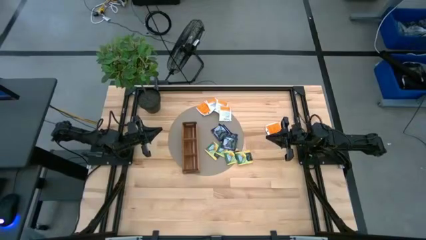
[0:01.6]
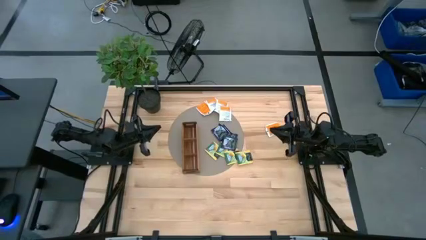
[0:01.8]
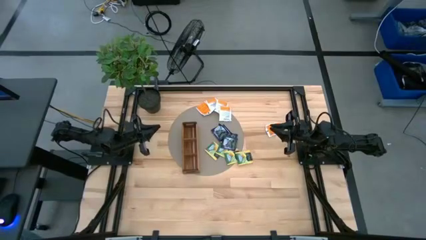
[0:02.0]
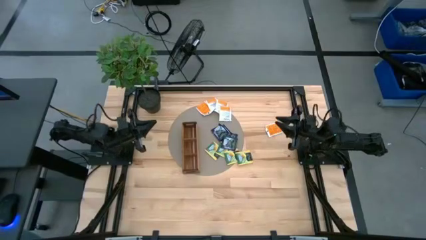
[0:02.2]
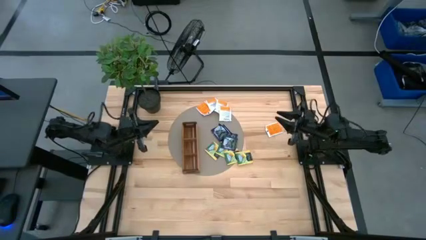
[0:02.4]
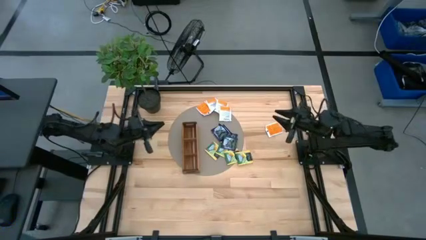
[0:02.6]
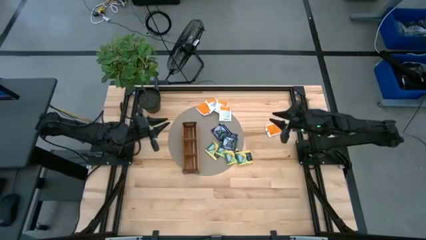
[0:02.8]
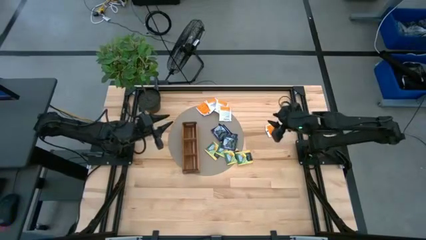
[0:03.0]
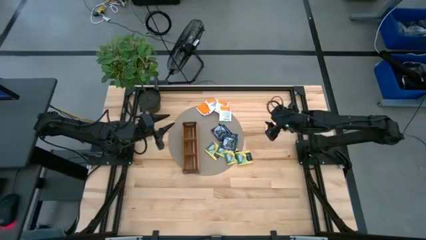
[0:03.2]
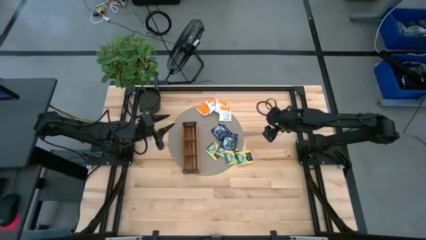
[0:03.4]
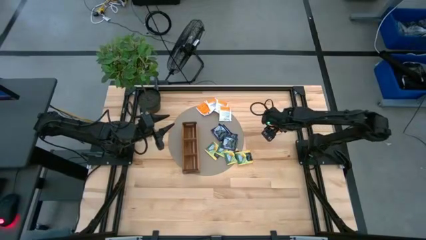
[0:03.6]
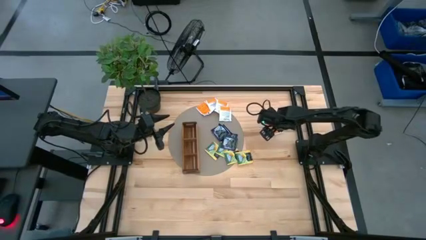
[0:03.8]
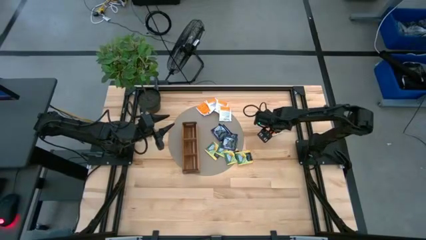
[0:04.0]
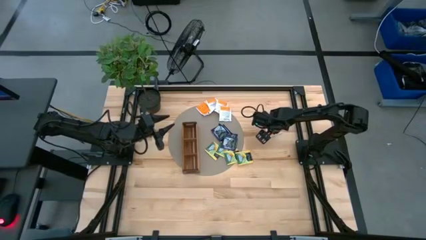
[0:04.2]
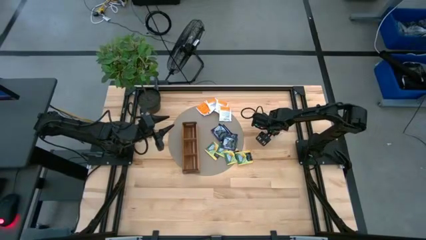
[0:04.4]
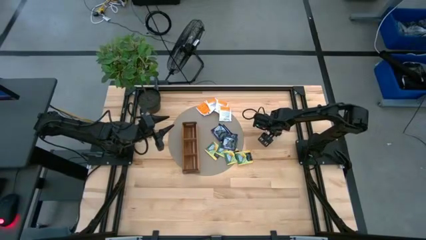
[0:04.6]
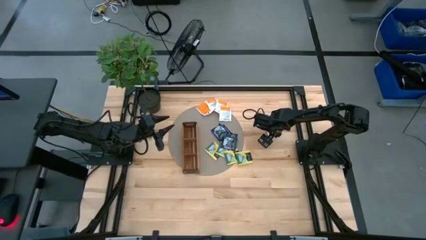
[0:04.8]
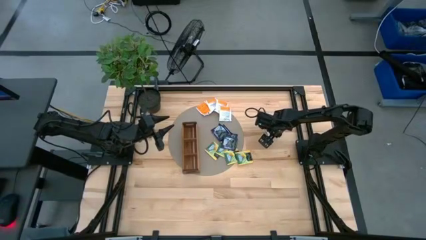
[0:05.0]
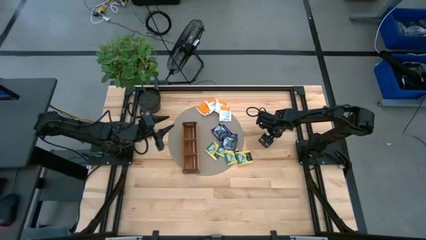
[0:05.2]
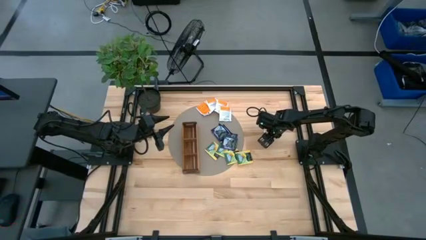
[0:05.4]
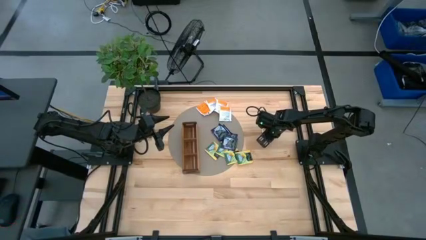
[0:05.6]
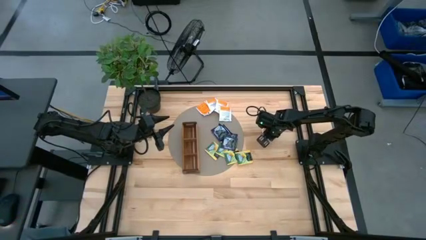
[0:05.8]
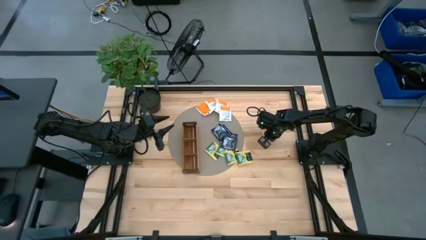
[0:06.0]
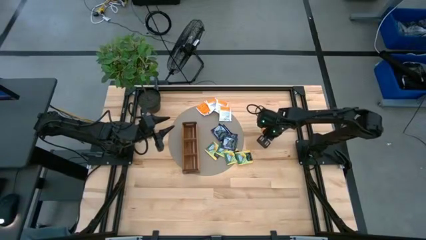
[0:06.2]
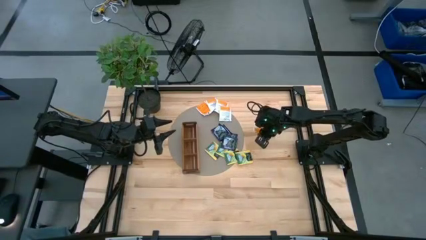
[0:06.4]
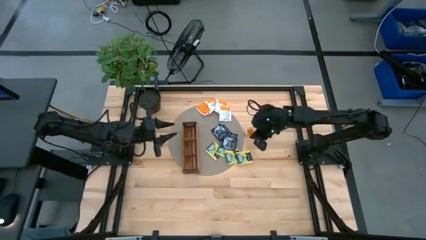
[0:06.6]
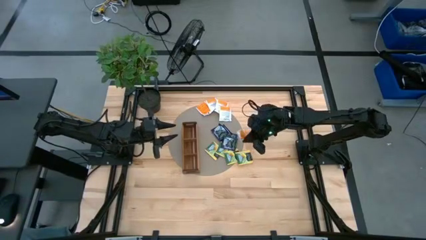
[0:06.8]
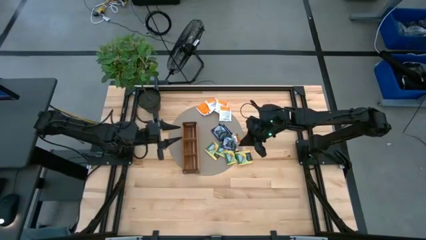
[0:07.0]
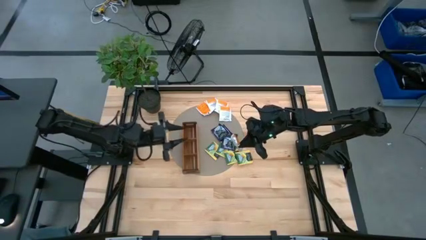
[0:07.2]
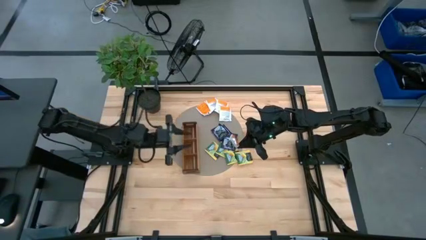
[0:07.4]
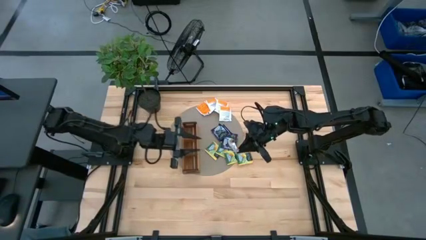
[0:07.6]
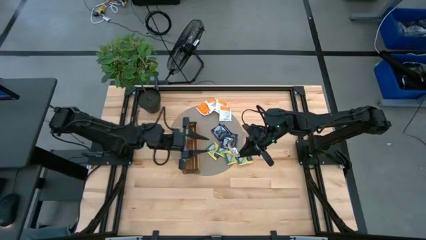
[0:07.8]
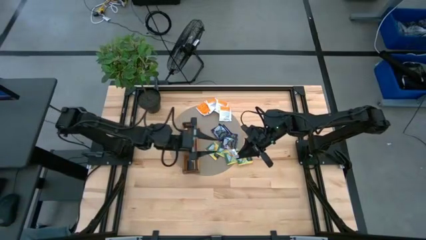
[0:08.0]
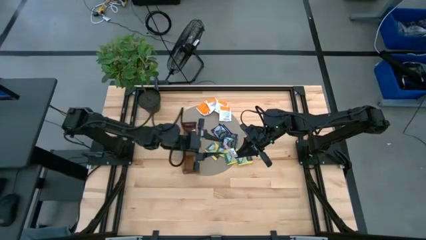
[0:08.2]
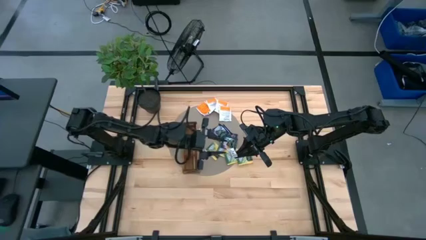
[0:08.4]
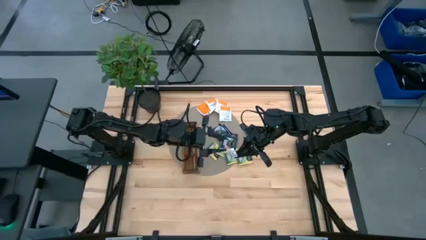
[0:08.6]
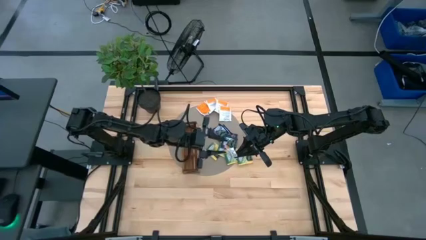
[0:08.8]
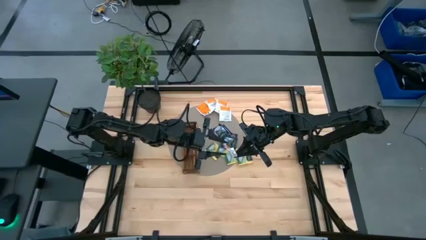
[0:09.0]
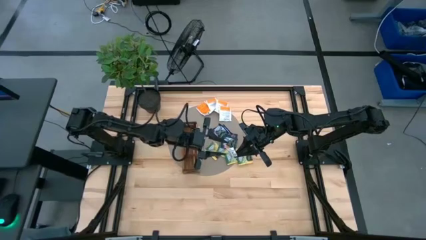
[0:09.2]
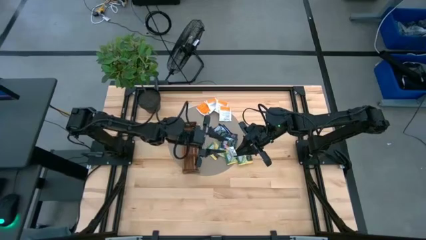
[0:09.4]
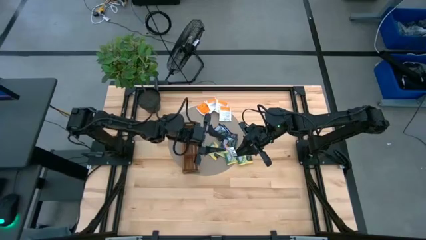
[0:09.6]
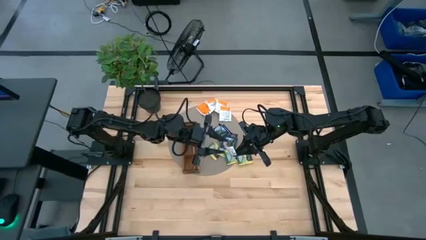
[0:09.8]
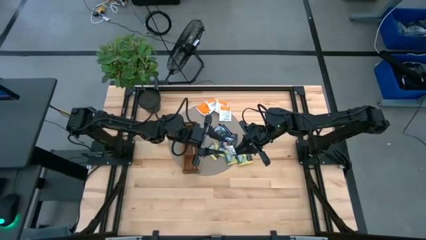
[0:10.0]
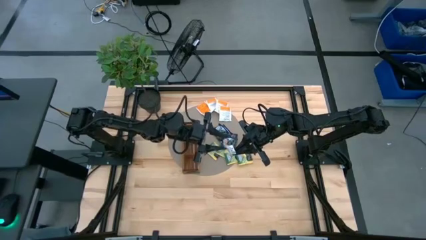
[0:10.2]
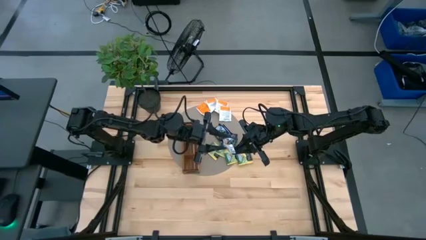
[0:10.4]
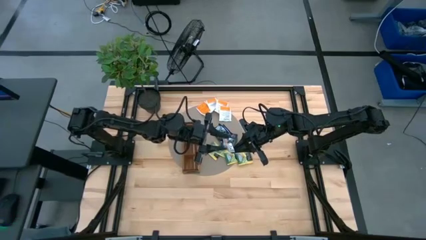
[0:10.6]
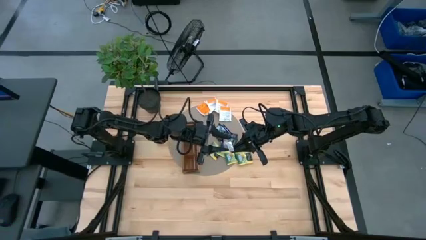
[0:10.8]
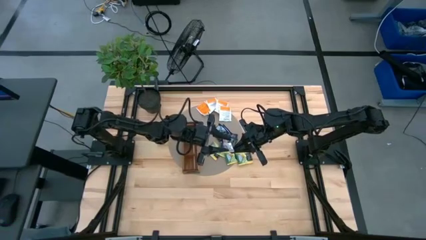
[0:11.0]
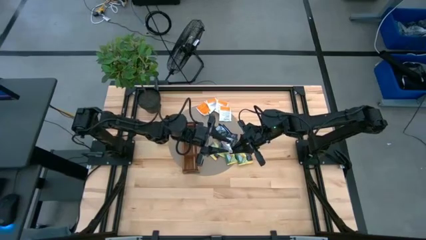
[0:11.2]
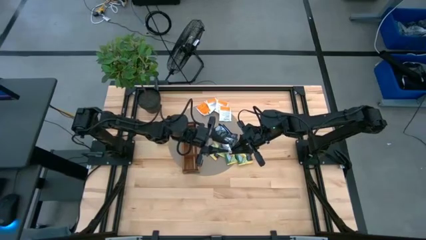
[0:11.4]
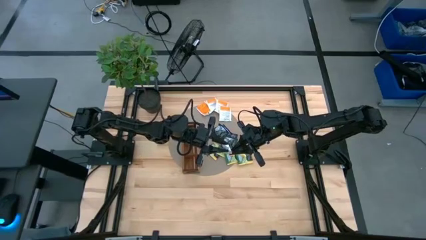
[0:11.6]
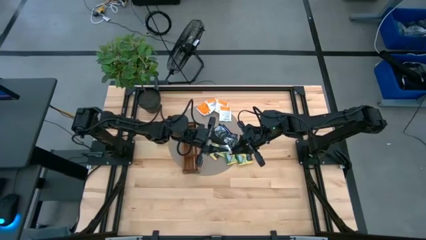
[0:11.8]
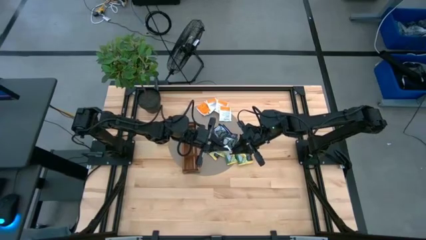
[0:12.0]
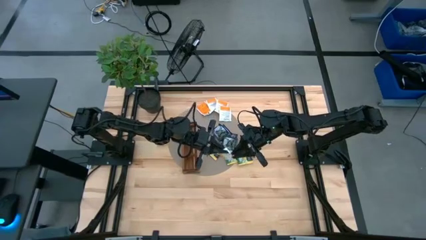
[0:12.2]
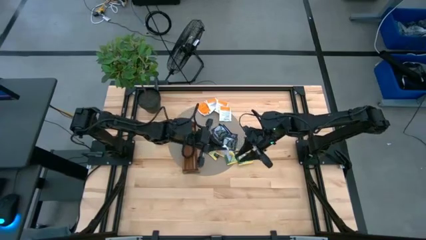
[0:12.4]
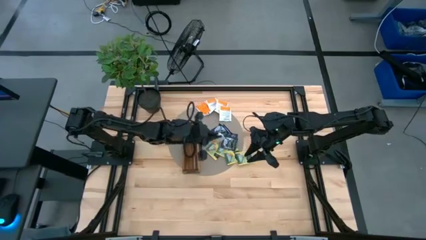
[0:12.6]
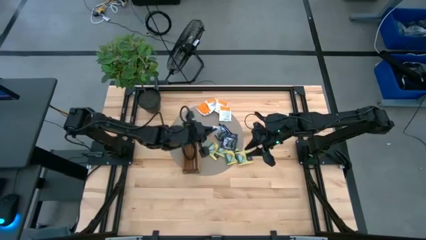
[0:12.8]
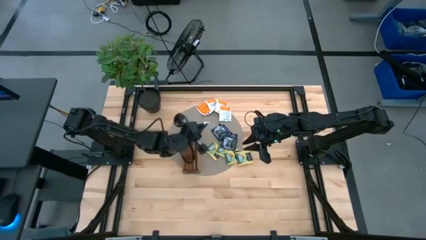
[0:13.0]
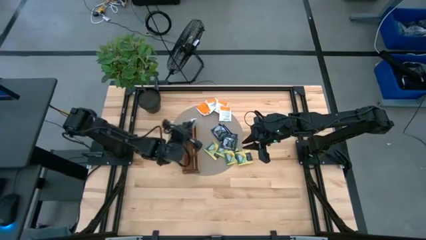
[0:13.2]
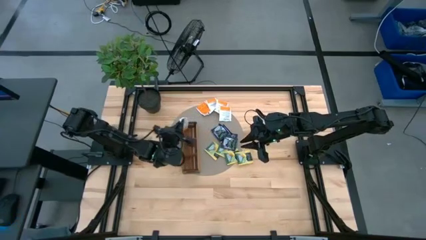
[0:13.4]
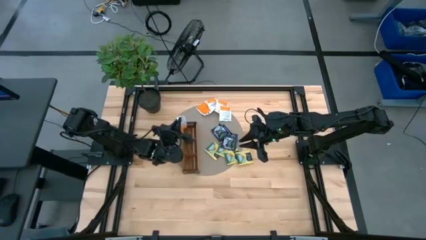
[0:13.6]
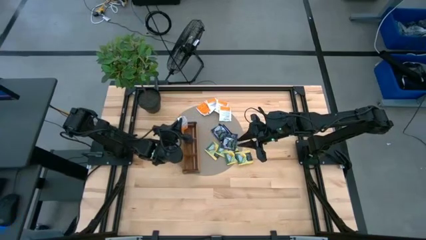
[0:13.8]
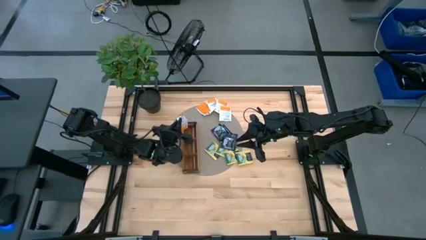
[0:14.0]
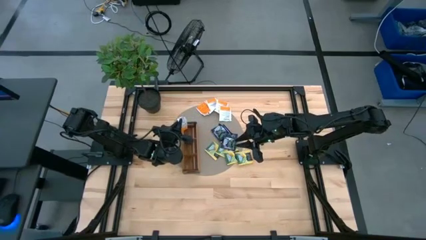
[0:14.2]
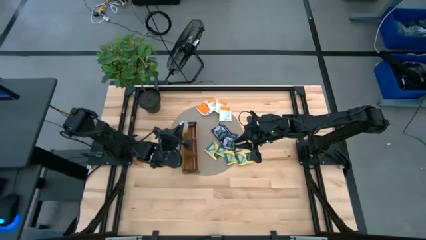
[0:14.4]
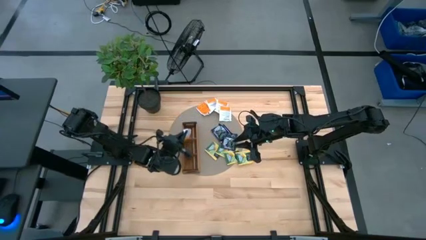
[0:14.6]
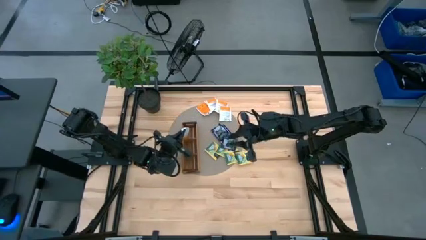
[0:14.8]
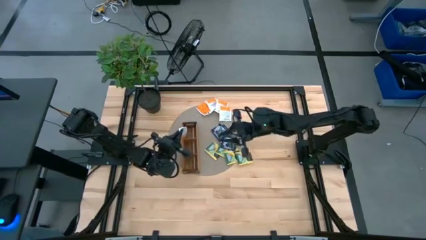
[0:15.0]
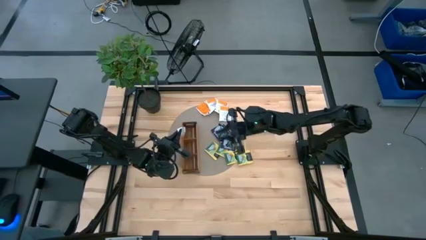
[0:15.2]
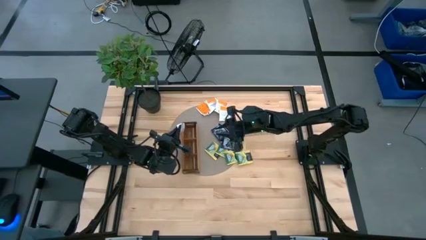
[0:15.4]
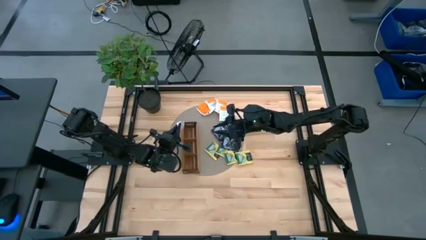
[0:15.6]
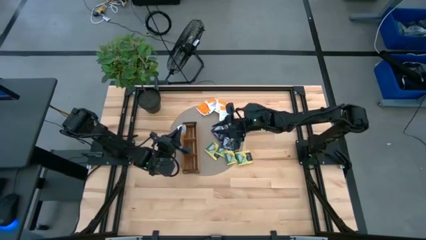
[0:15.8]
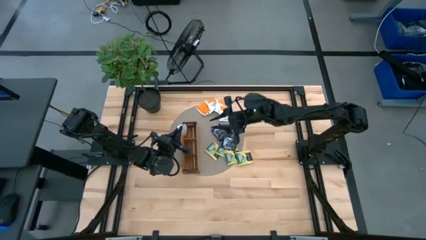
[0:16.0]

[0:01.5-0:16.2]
Task: Pick & Place Tea
Put the white tea bag into the bottom section of the wooden organizer
